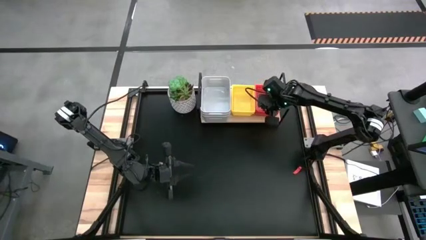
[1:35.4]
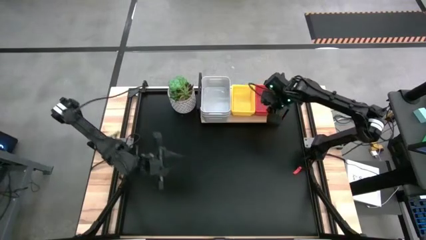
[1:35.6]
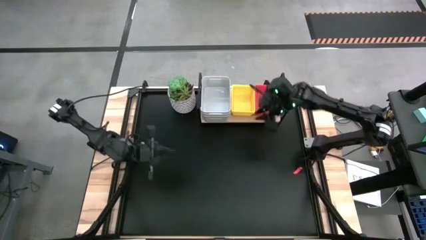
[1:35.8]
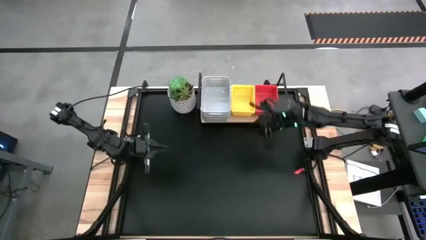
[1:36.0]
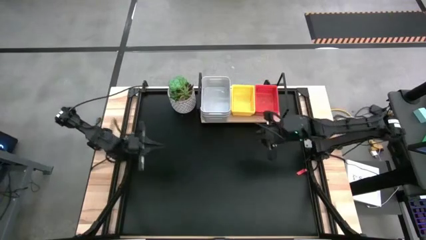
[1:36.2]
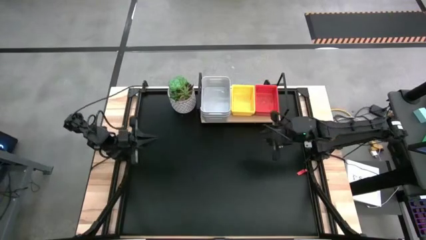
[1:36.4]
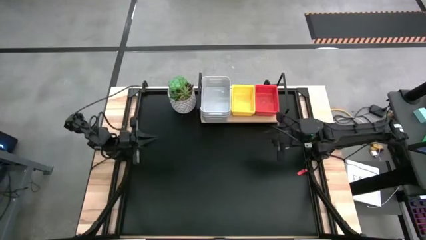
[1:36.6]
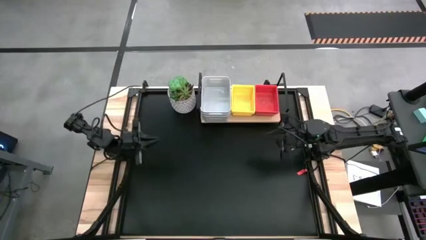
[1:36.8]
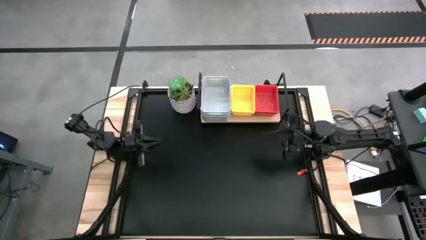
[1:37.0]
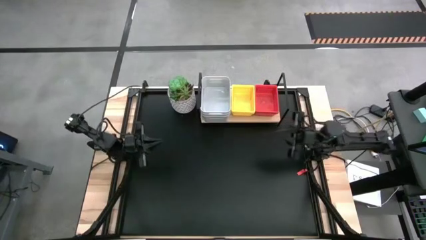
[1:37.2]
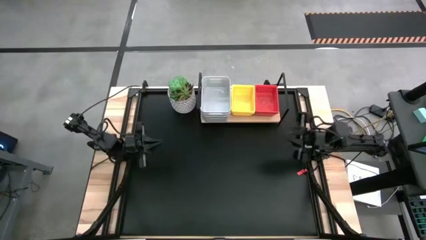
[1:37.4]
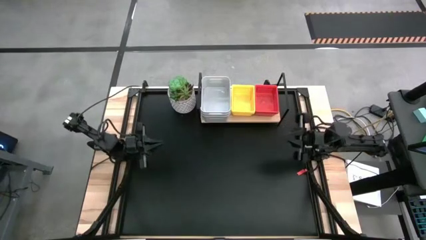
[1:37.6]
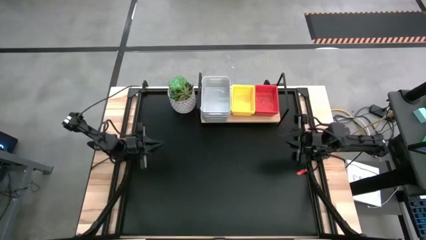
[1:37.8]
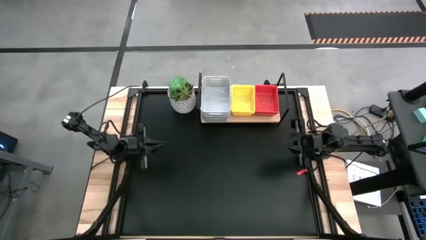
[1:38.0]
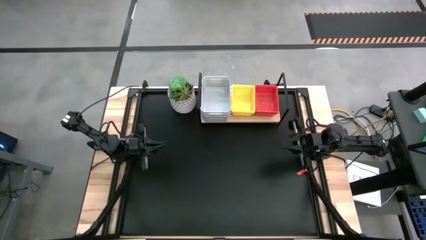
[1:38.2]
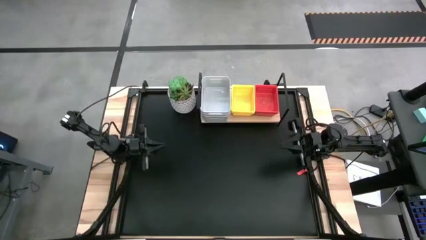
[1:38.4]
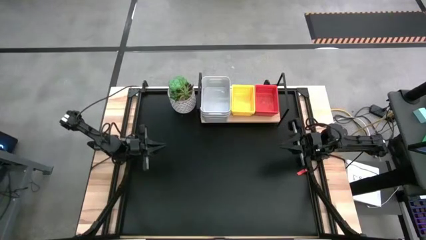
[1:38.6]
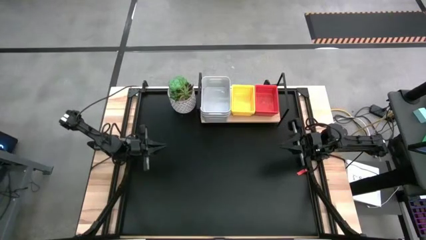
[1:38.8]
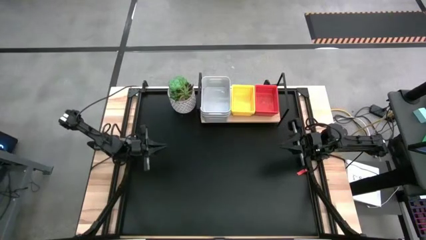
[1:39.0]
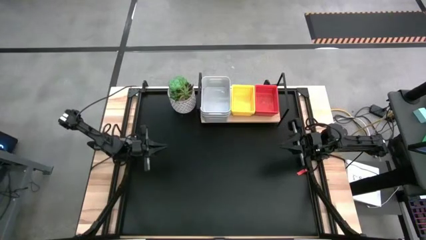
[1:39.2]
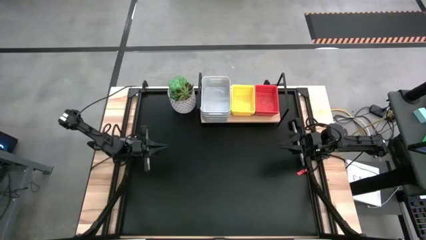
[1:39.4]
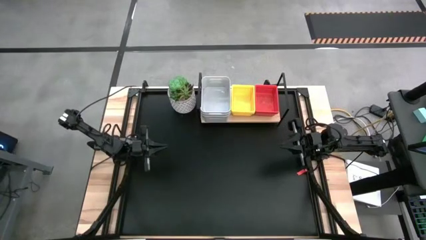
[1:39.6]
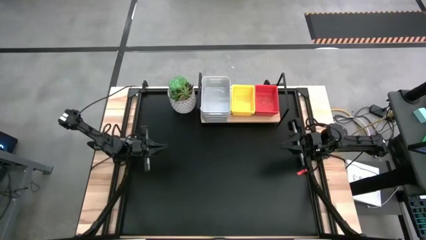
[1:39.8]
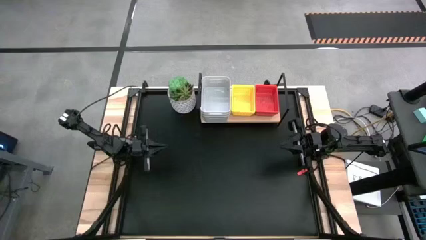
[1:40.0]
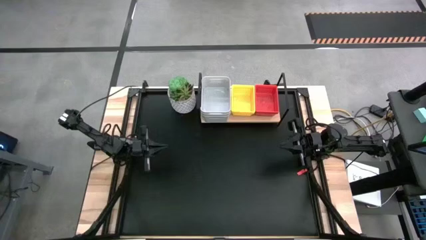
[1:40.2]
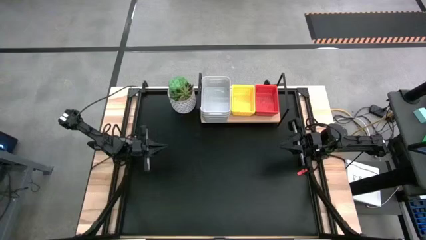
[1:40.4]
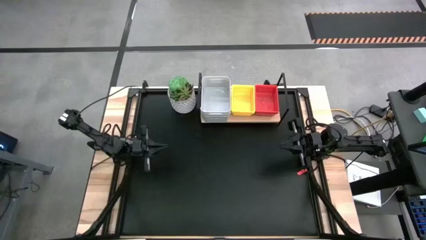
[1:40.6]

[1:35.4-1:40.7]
Task: Stack baskets on shelf by color
Return to Home Position

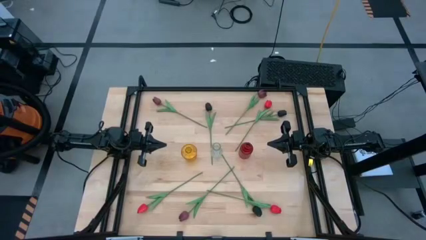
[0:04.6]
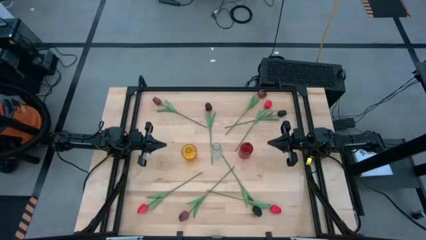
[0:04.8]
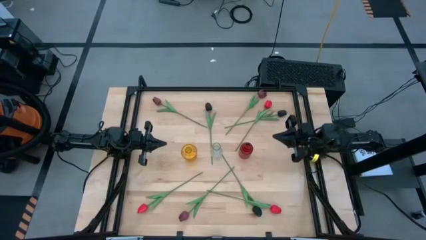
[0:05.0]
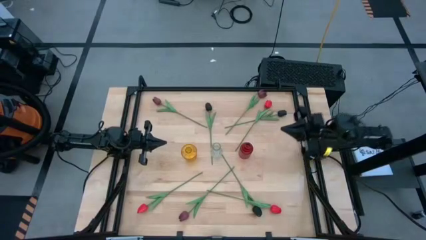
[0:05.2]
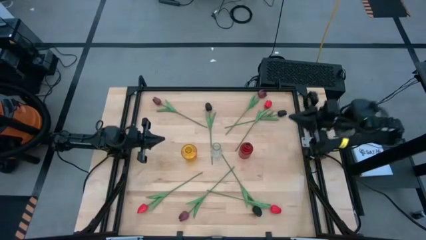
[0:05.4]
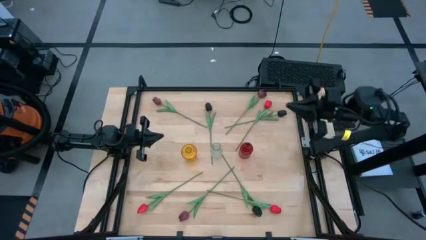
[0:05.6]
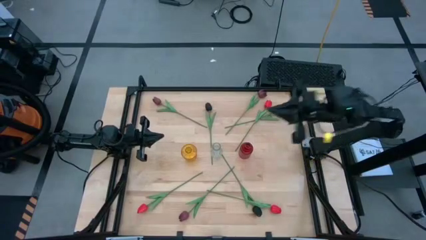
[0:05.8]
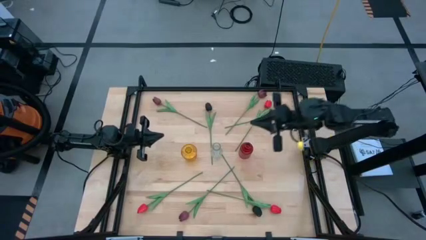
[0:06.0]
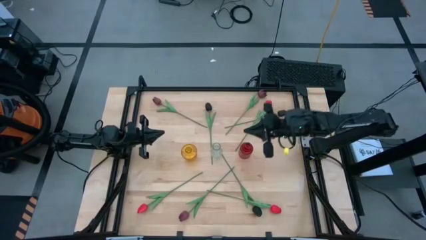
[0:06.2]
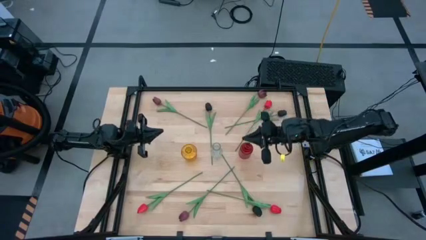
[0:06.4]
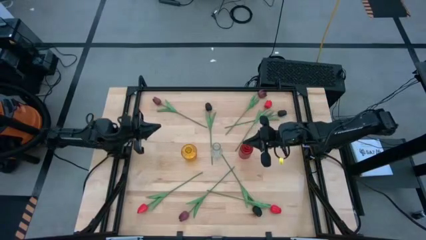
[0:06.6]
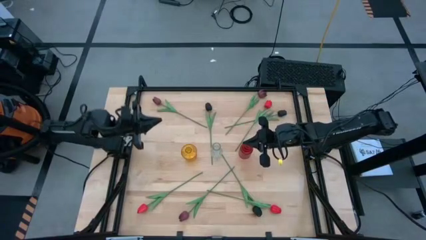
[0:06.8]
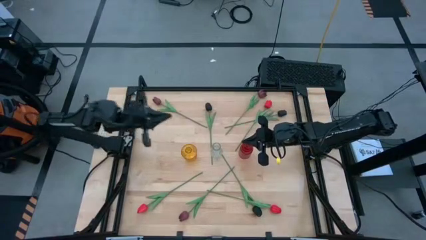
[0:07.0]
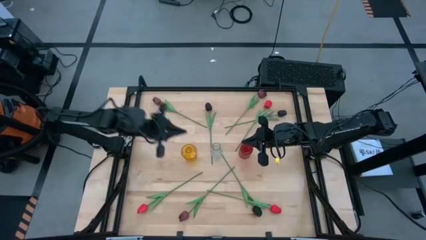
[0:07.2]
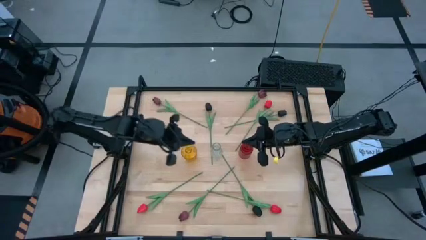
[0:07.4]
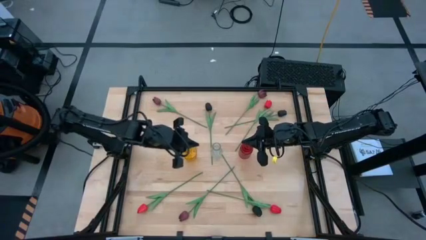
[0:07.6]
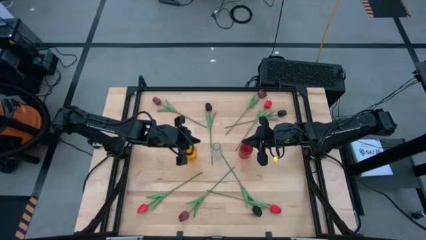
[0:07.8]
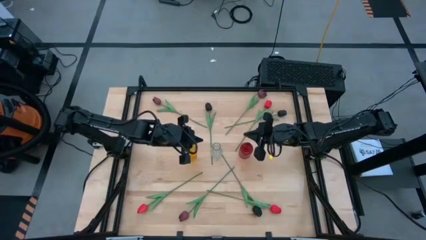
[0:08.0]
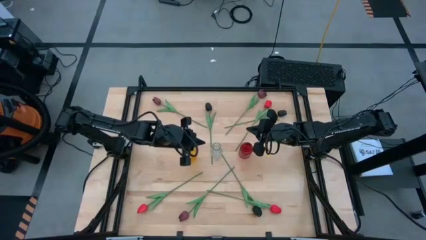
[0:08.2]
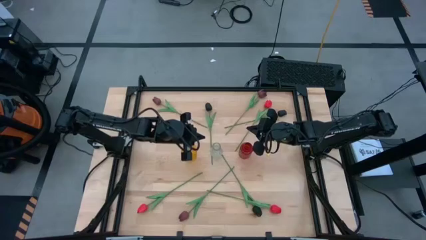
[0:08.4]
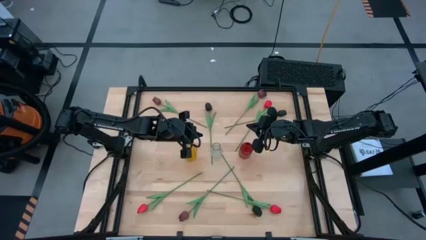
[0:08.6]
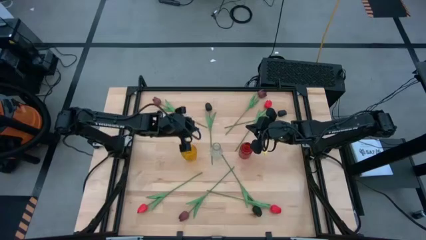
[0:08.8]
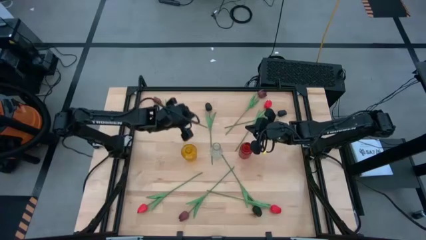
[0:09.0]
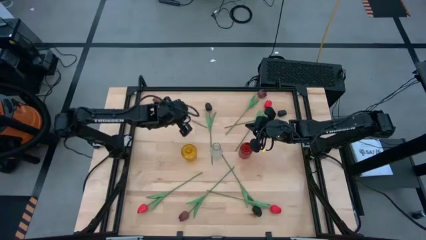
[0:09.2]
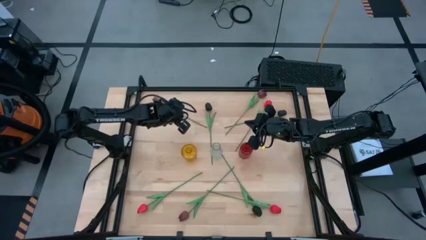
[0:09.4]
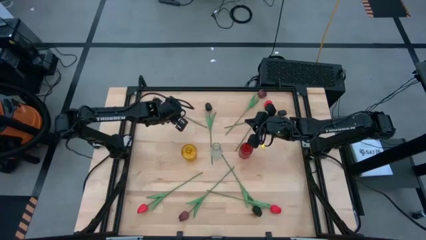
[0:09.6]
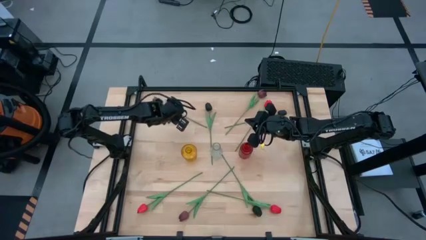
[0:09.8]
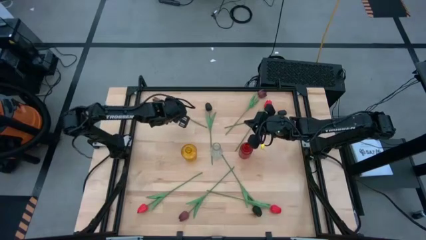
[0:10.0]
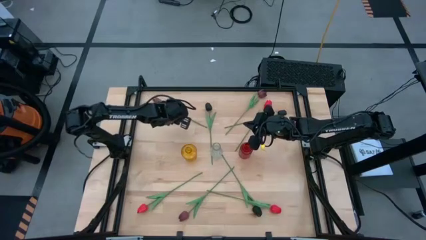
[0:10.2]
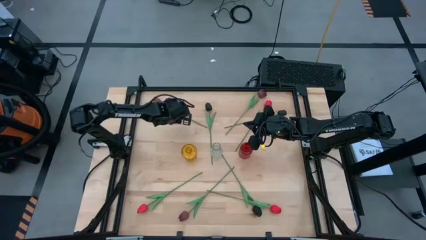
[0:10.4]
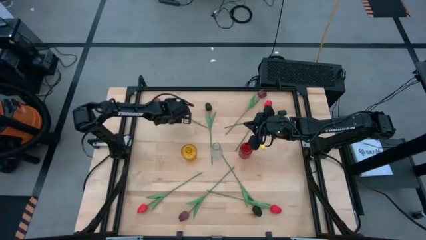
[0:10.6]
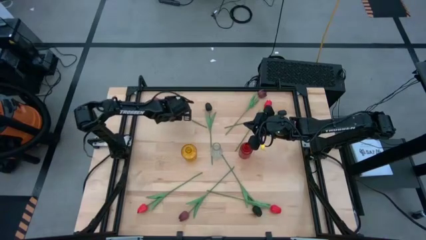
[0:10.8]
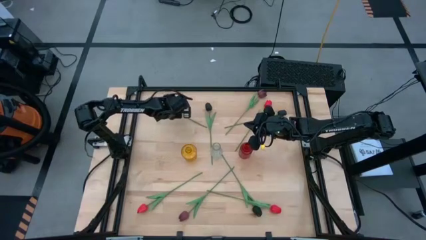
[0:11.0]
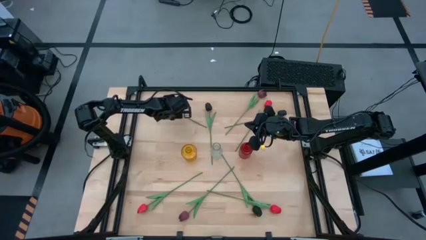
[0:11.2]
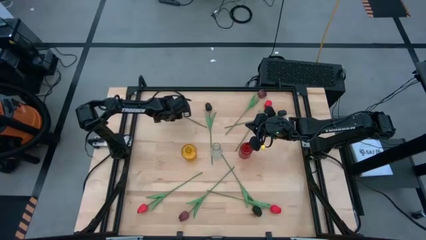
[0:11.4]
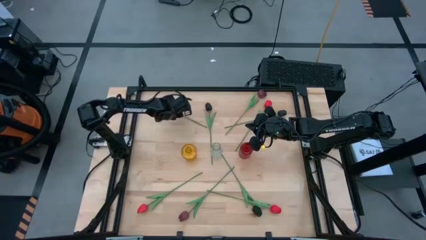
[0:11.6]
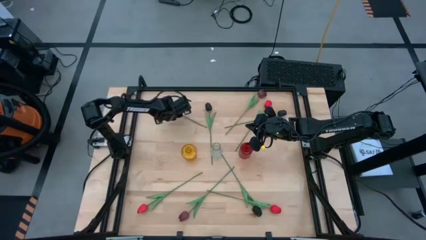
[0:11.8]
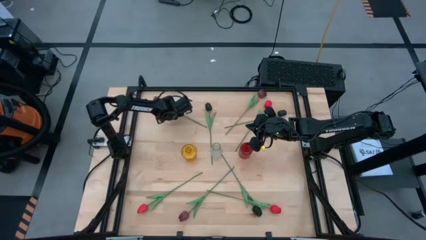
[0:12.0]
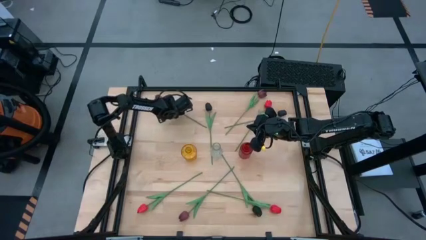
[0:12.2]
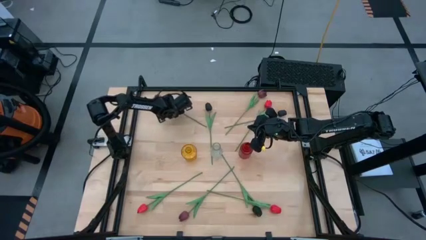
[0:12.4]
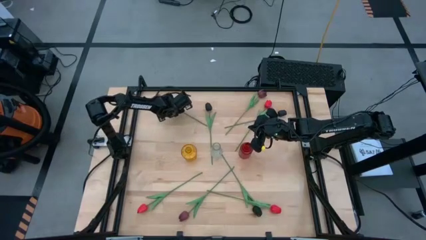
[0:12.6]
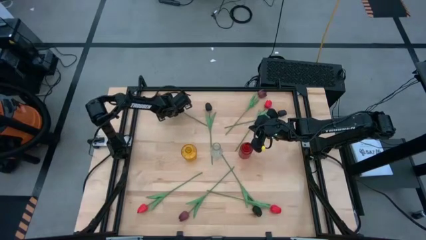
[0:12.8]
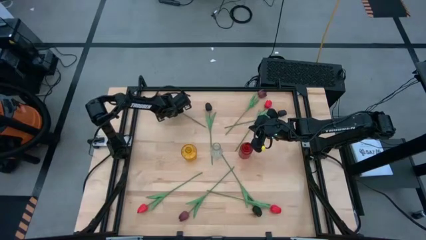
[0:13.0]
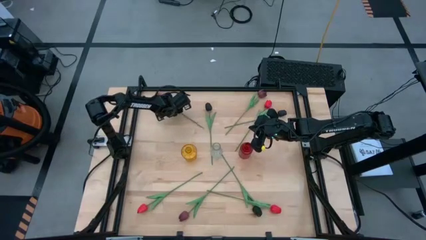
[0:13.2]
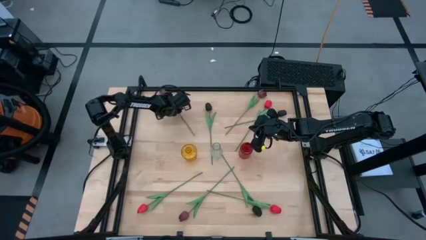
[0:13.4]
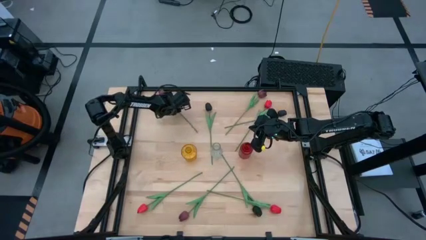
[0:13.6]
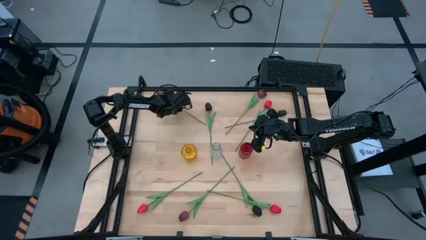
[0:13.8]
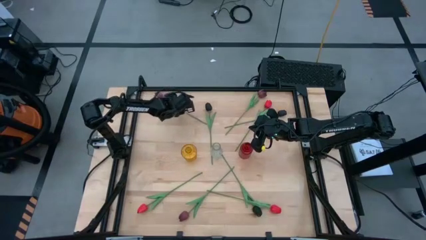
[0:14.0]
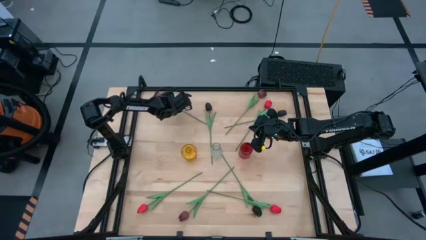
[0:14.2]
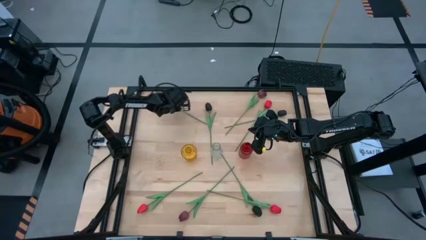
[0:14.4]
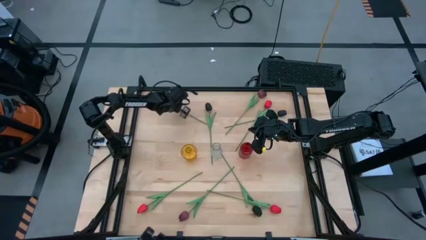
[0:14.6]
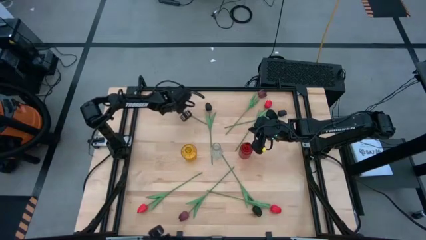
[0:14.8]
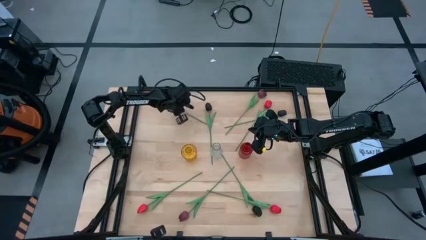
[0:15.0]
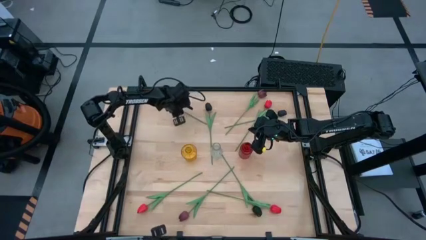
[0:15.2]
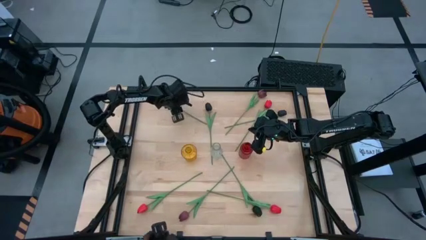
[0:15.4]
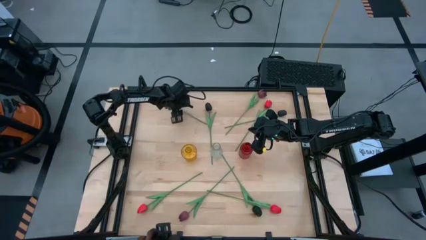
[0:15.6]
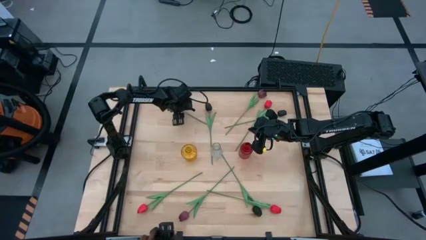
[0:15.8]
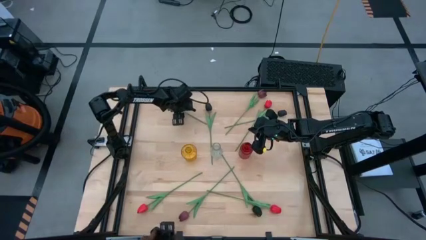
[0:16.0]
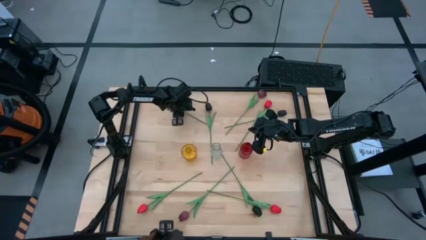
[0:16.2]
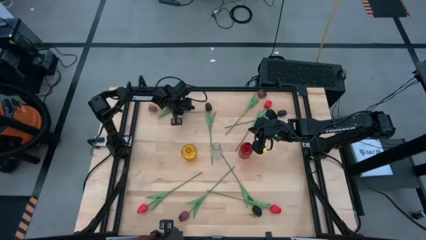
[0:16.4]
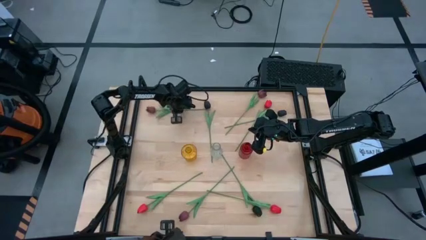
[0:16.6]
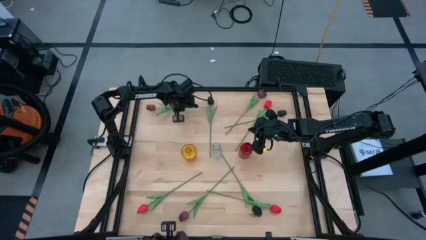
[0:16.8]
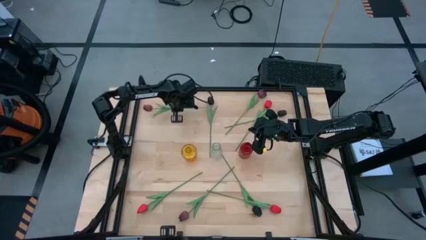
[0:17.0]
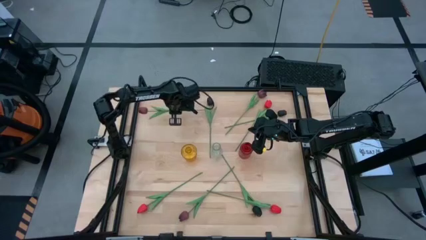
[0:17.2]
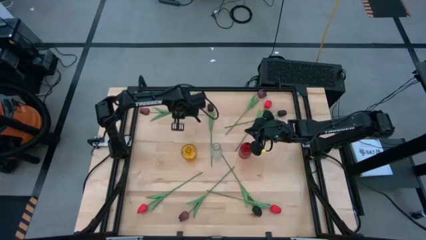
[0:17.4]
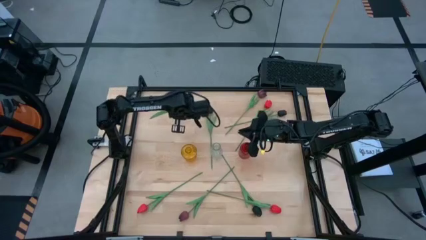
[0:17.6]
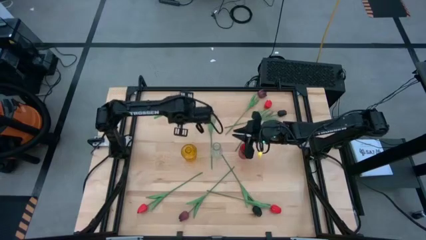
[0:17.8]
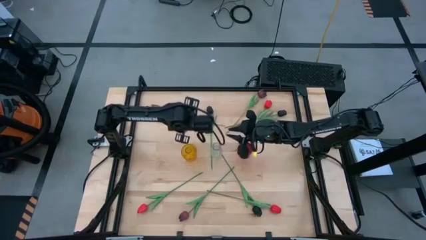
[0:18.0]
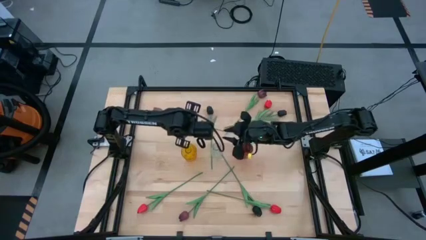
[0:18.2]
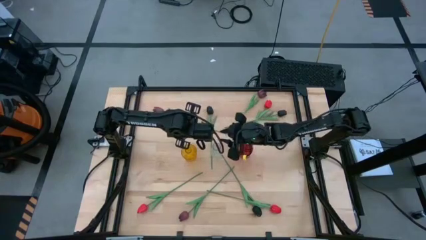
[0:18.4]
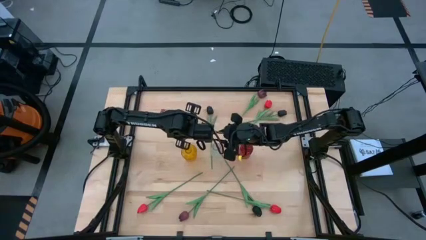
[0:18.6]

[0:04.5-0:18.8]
Task: Sort flowers into vase by color
Put the top left red tulip into the yellow vase
